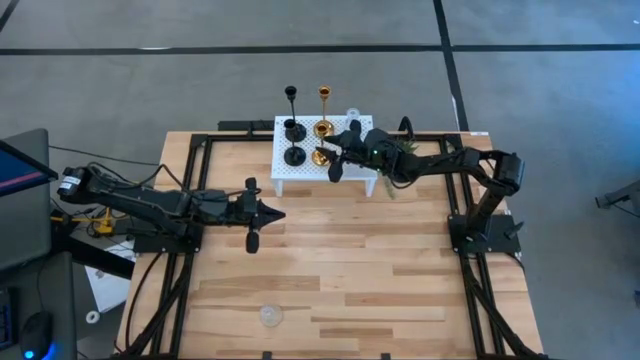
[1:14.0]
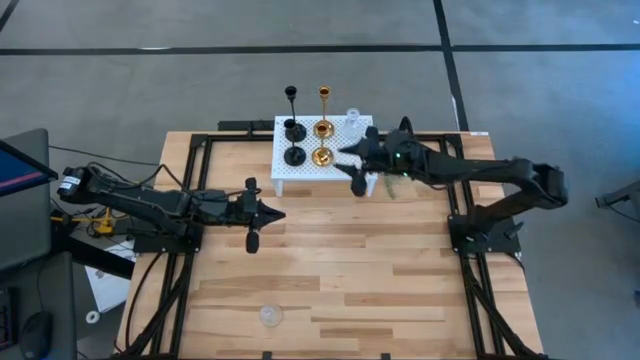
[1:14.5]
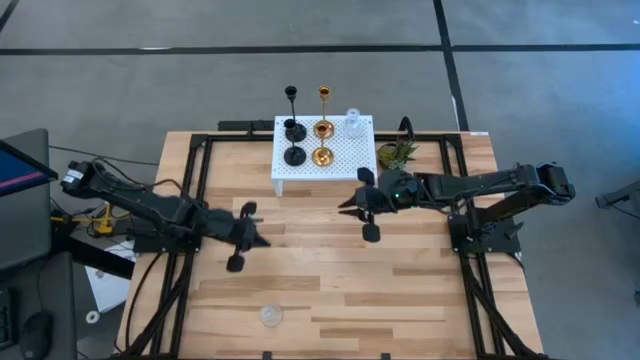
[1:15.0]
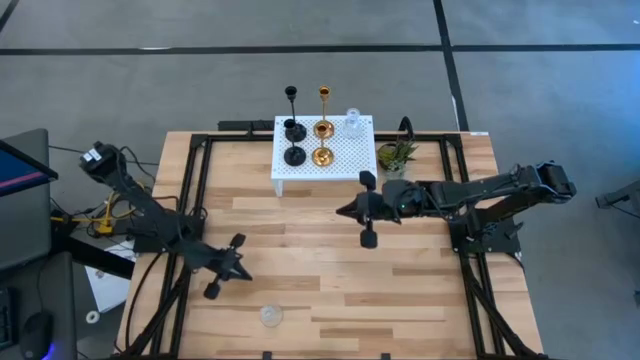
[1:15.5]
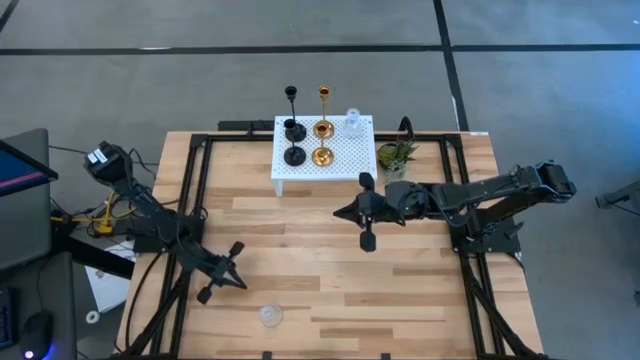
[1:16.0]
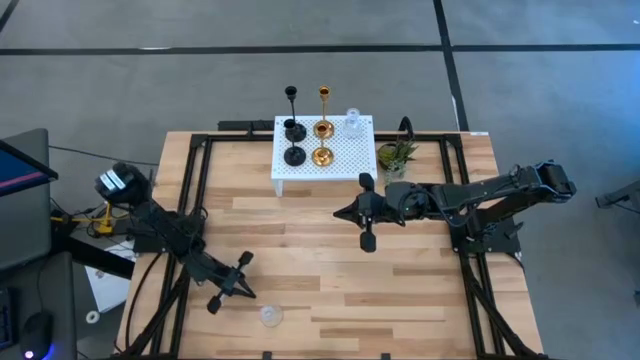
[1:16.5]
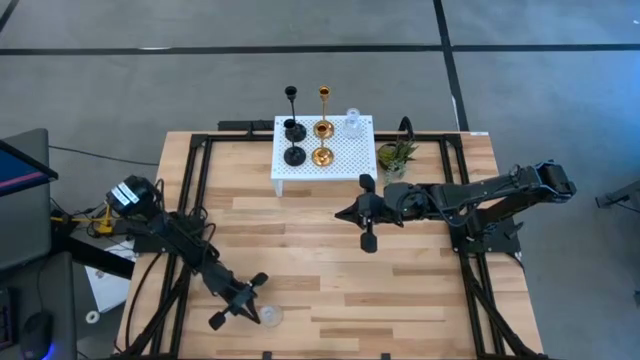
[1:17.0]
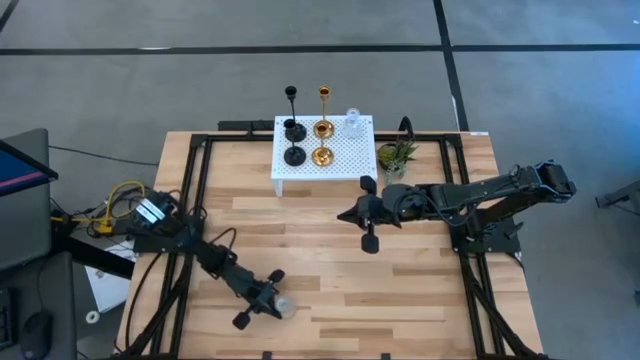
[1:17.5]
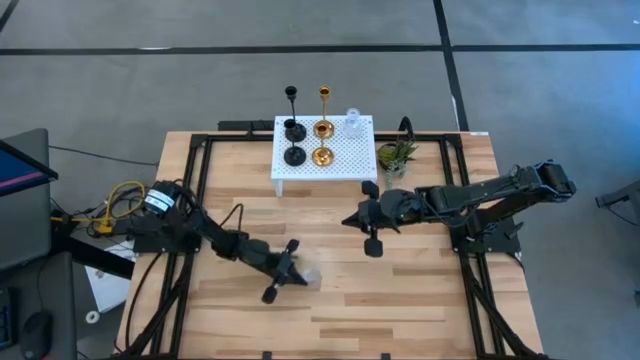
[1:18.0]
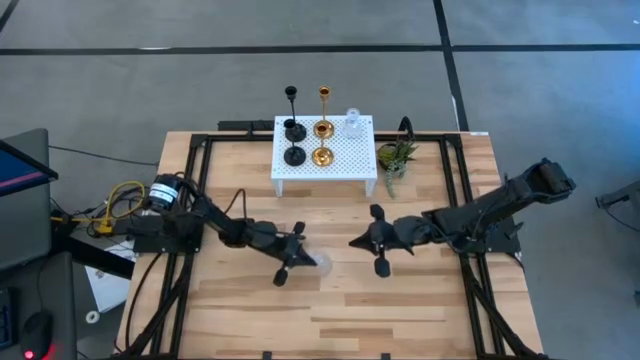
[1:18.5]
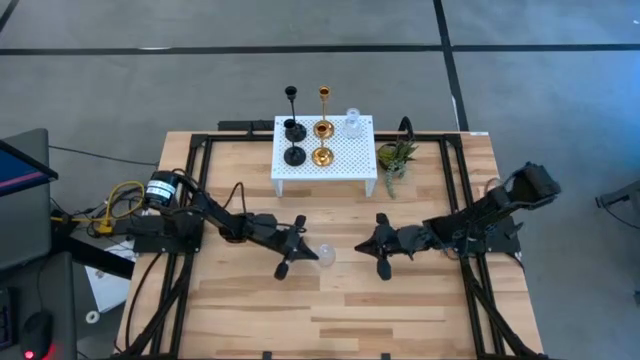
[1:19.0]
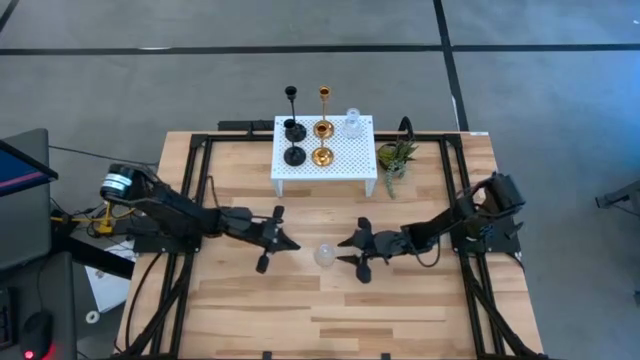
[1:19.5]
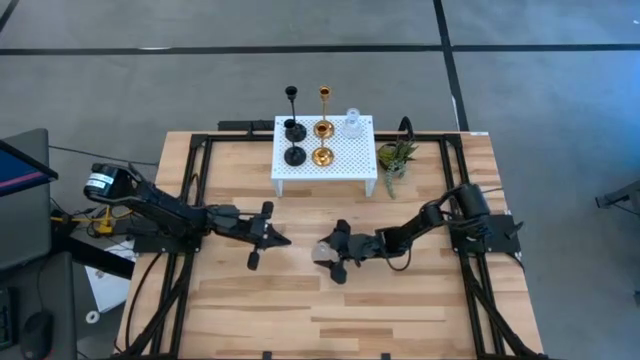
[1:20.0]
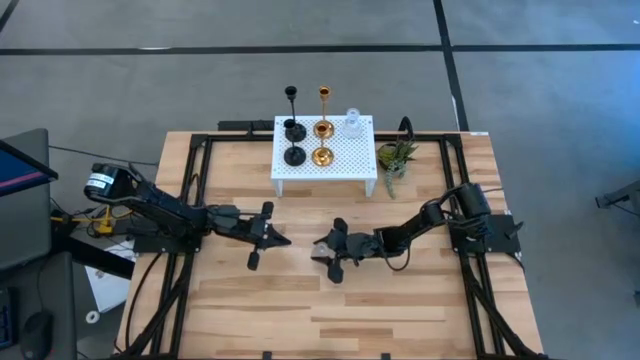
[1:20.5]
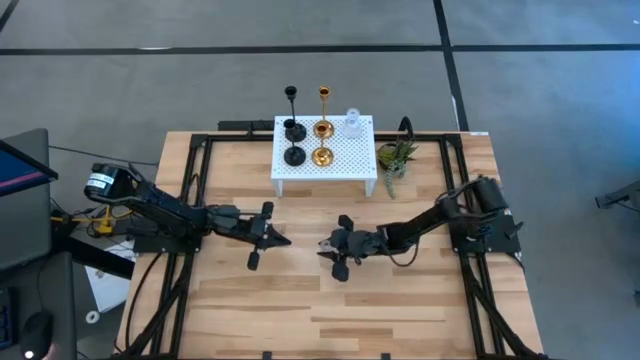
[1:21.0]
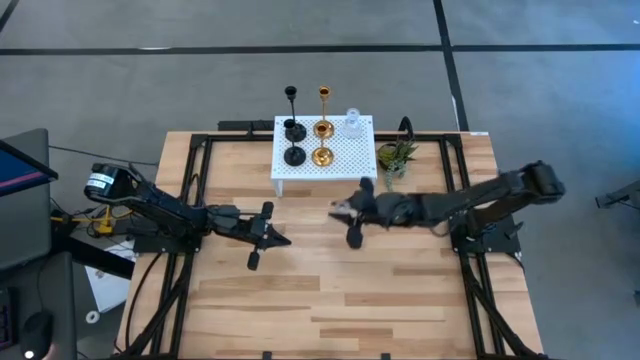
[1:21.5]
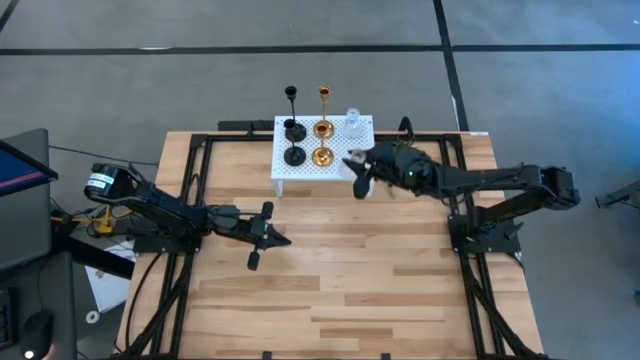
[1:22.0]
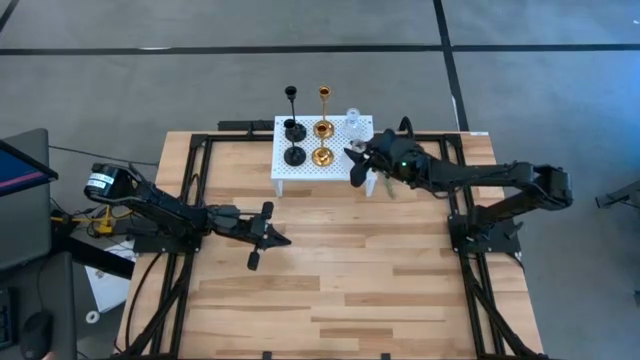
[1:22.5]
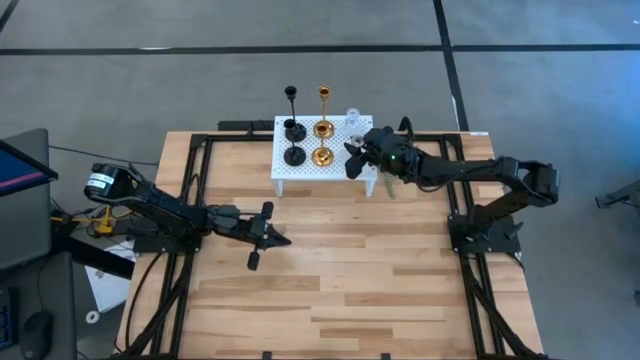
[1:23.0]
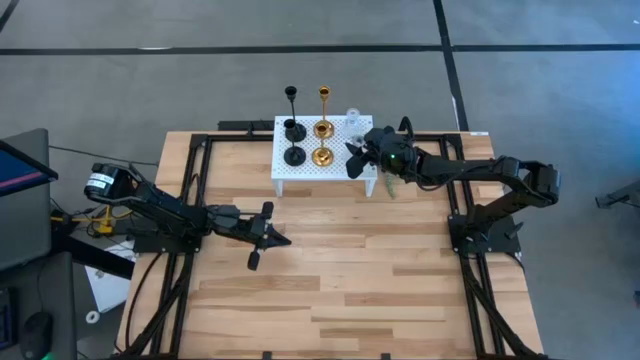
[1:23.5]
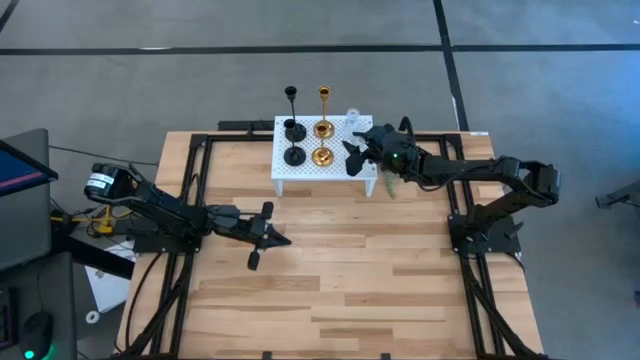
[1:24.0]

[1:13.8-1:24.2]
Task: Pick & Place candle stick holders
Put the transparent candle holder on the shelf aligned with the other transparent candle holder

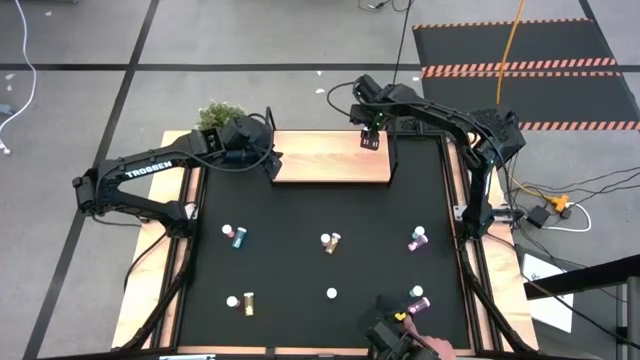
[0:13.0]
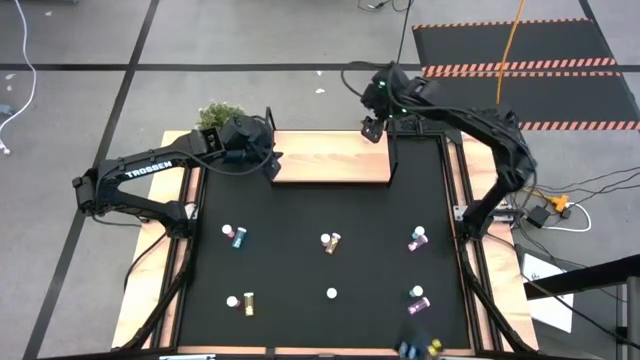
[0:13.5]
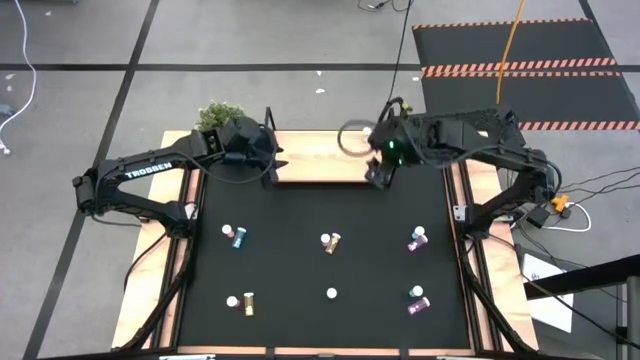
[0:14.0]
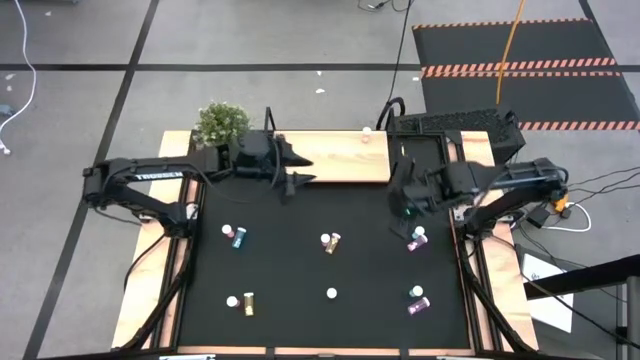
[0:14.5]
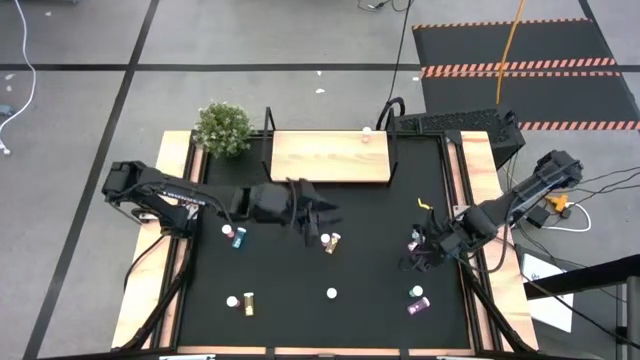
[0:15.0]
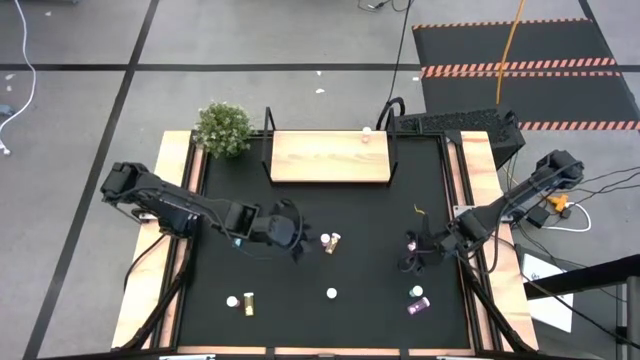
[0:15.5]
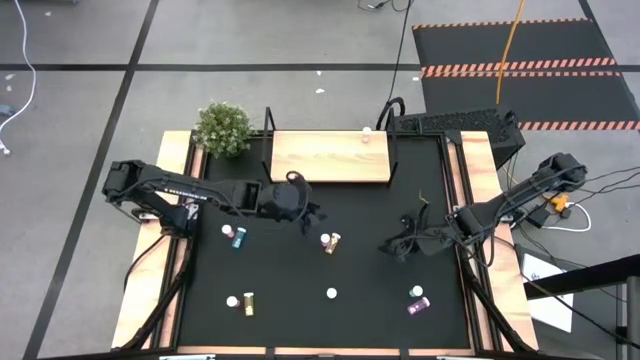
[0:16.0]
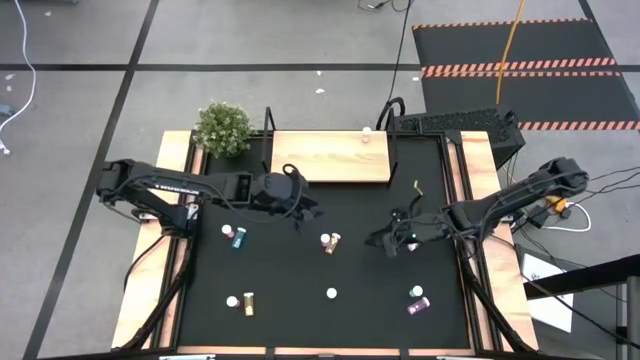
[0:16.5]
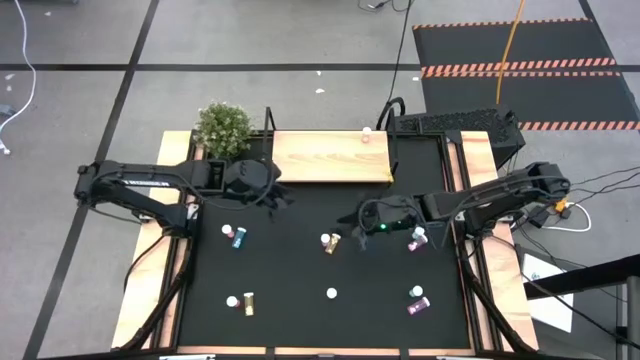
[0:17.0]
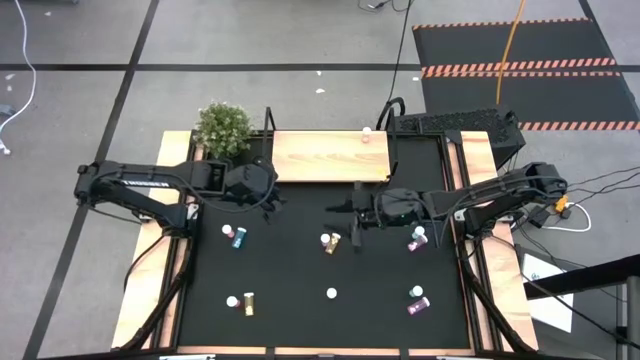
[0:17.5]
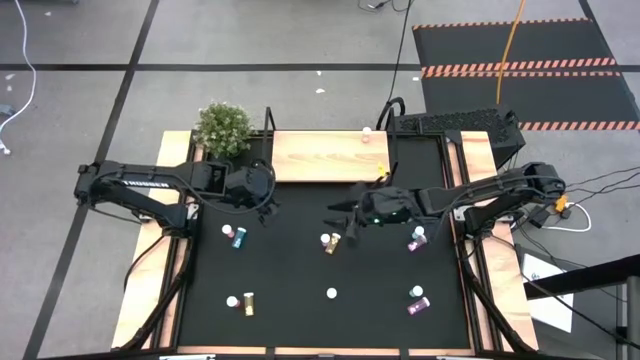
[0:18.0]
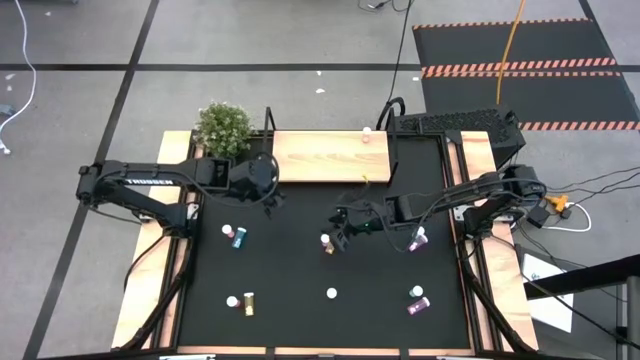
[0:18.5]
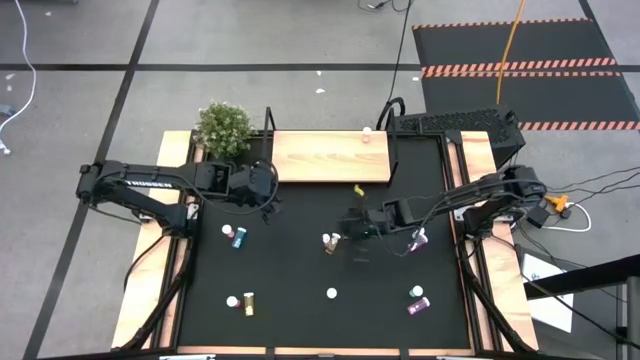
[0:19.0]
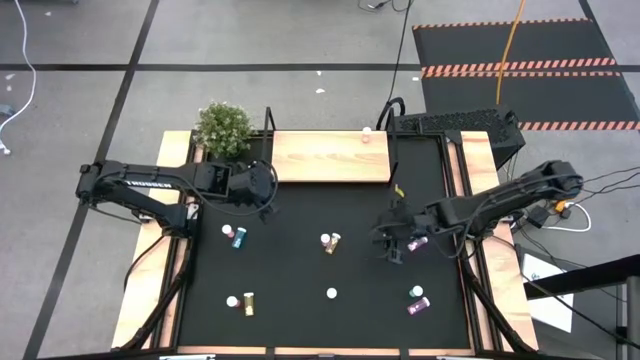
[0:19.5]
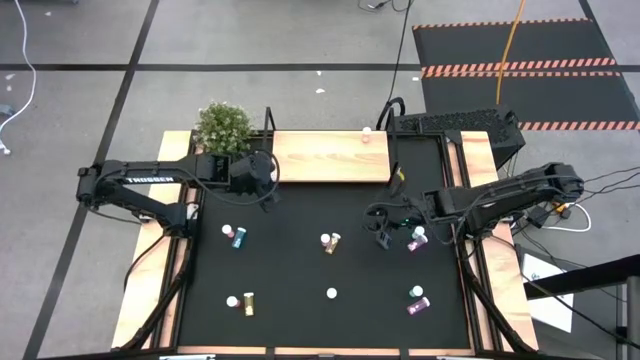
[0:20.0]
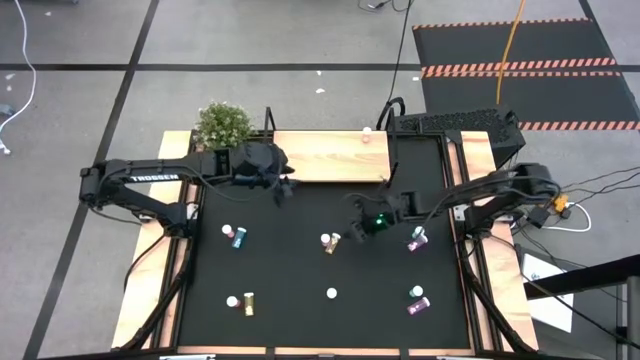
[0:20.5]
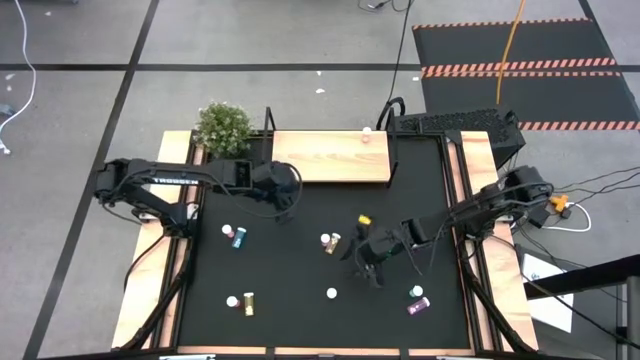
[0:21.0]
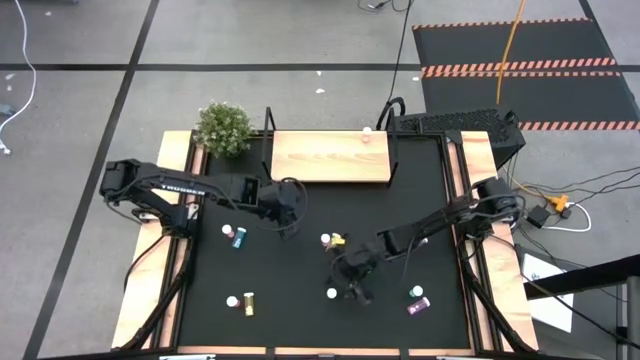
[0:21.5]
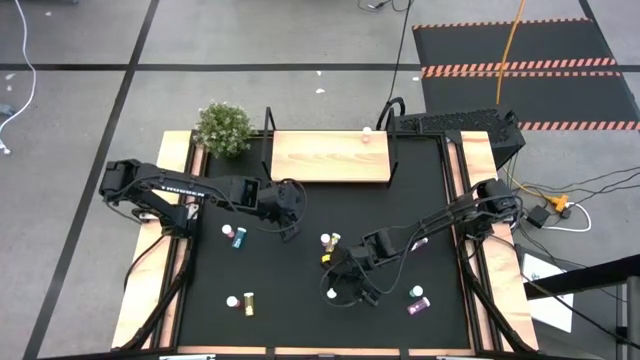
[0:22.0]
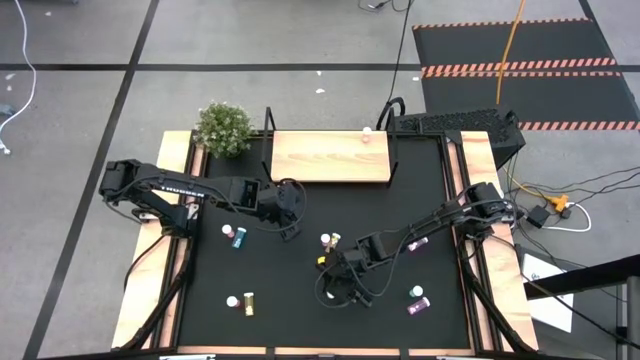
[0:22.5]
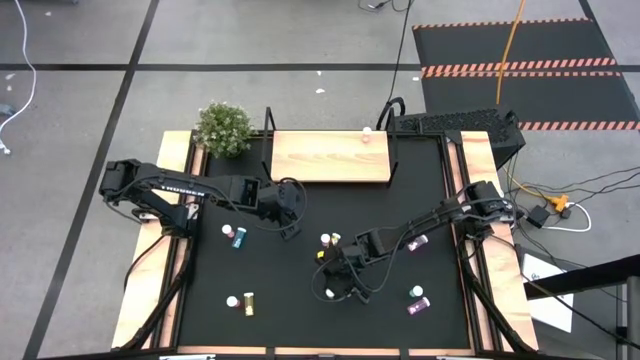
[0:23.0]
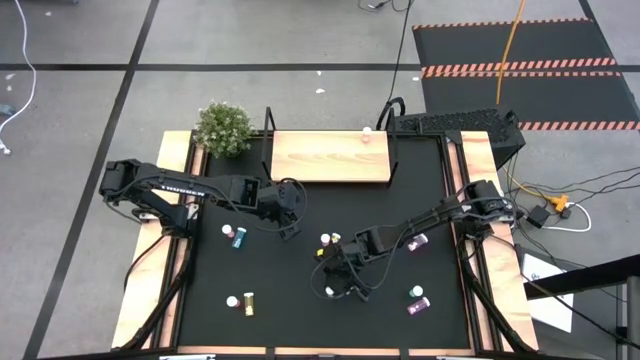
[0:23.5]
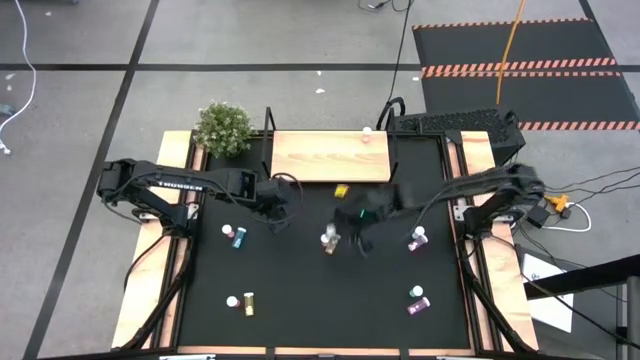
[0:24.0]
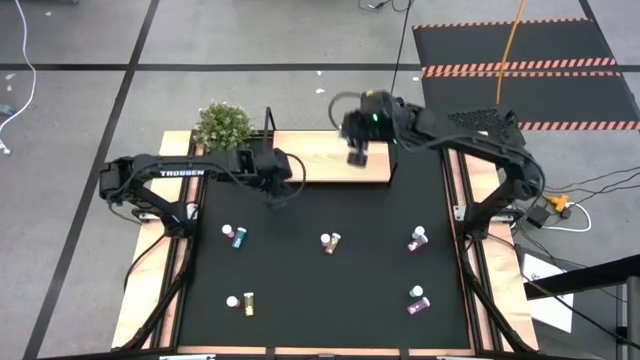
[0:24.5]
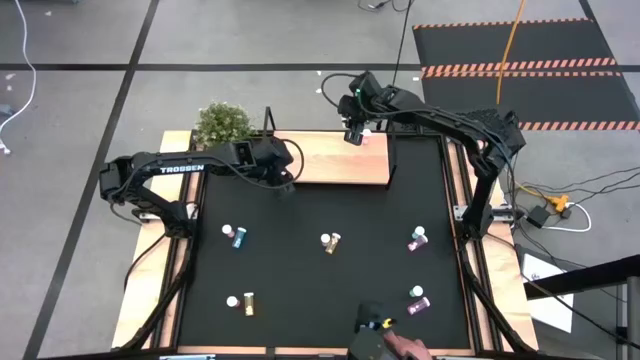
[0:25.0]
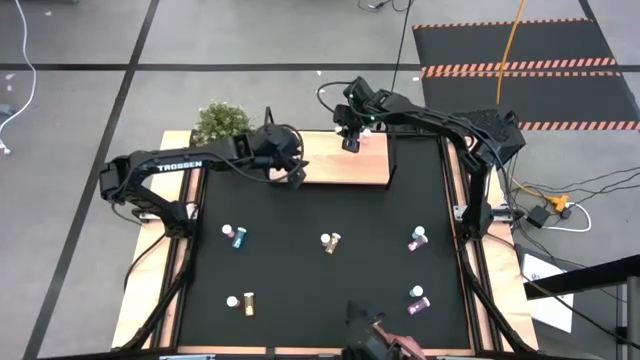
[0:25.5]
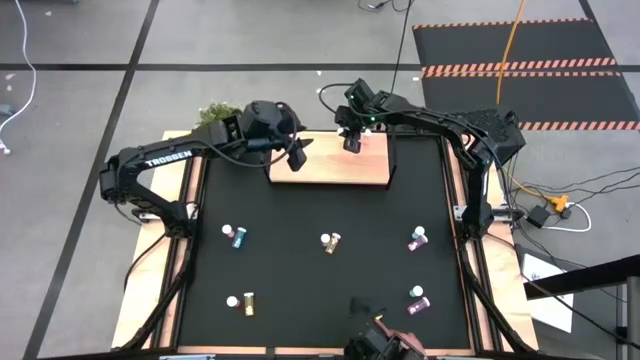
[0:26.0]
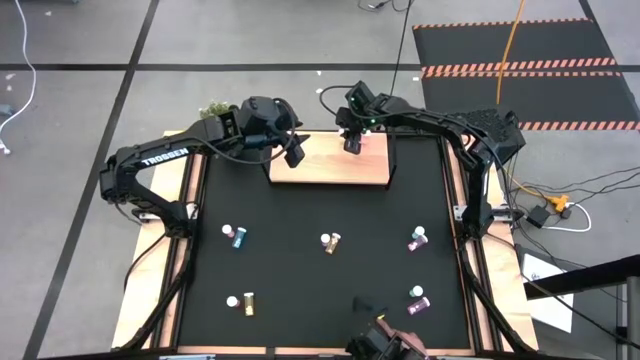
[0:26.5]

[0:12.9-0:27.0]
Task: Pick and place medicine bottles onto shelf by color
Put the bottom right yellow pill bottle on the shelf
